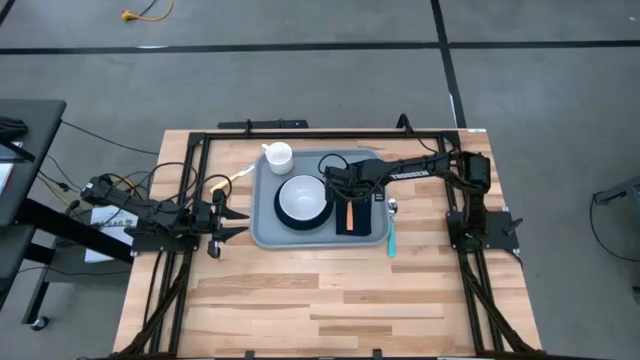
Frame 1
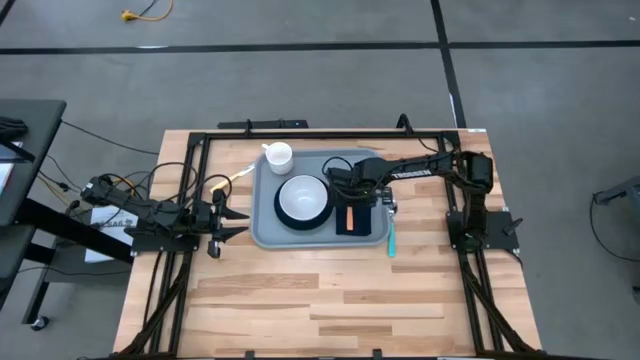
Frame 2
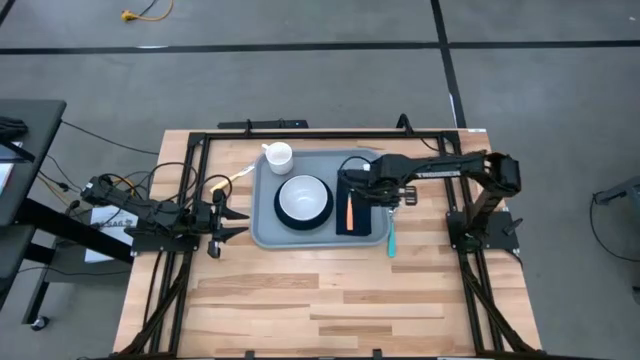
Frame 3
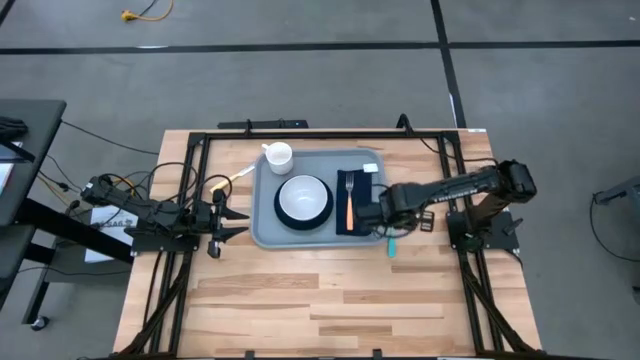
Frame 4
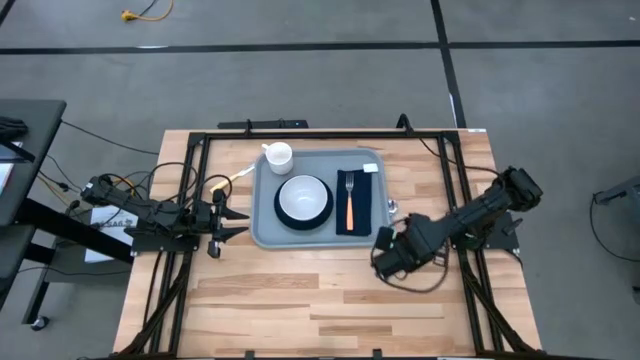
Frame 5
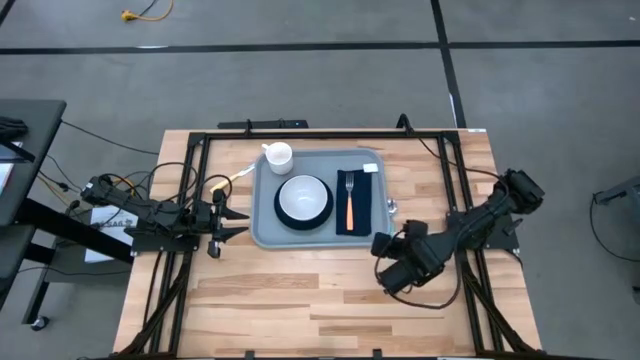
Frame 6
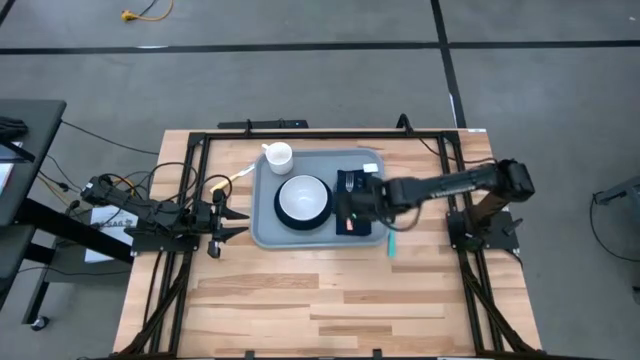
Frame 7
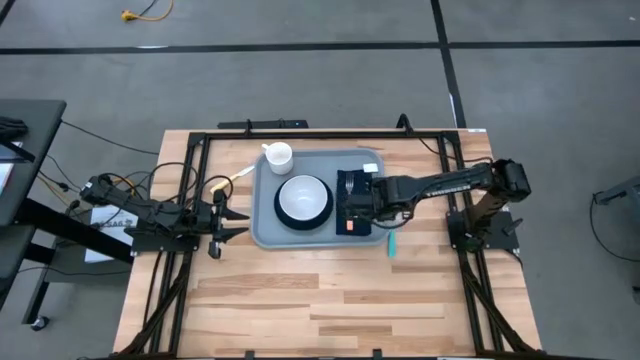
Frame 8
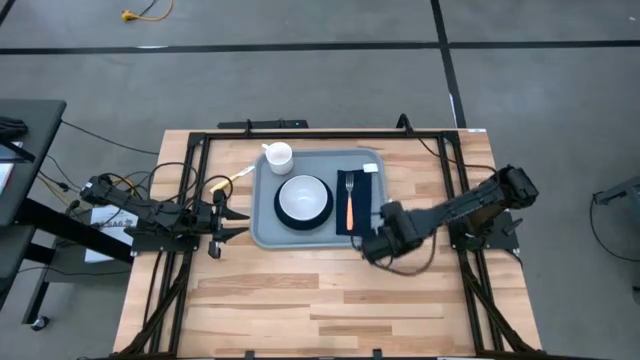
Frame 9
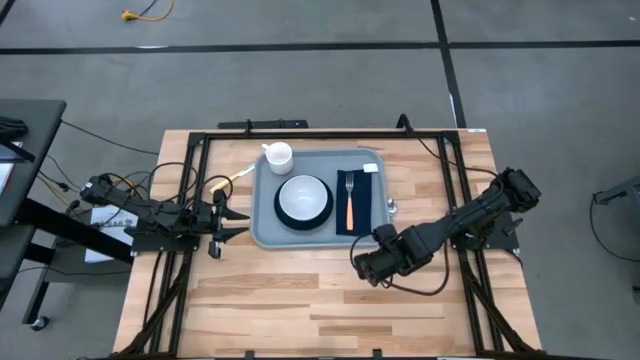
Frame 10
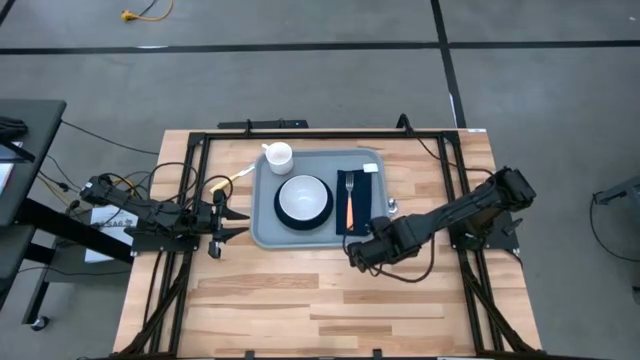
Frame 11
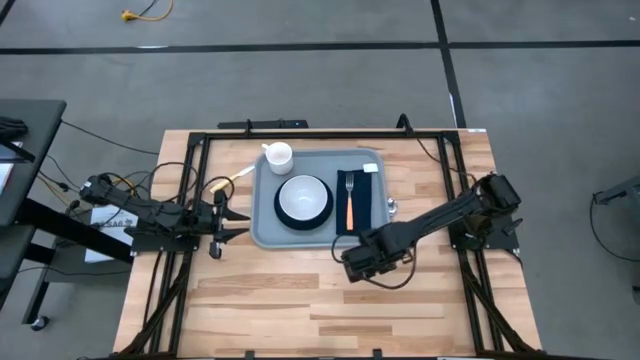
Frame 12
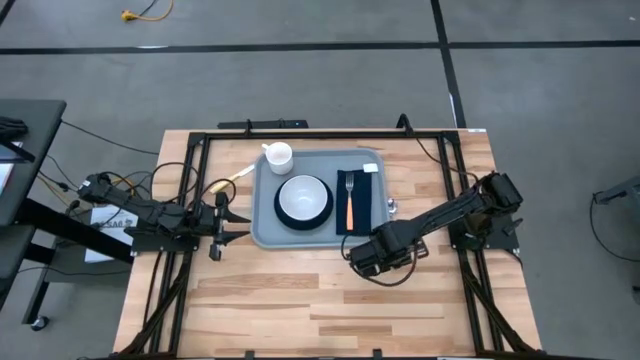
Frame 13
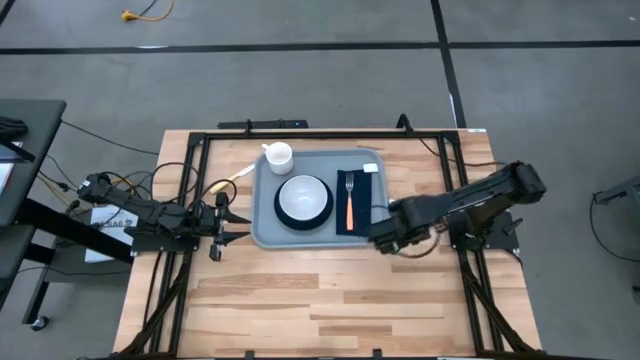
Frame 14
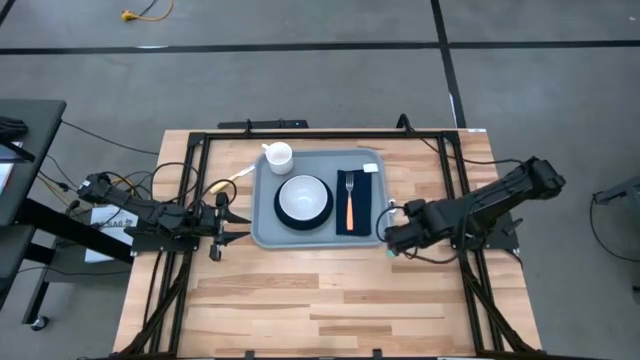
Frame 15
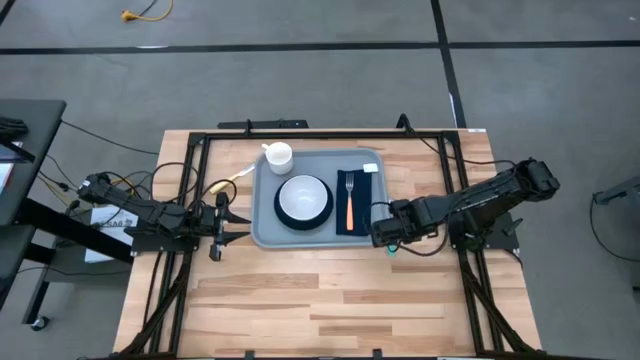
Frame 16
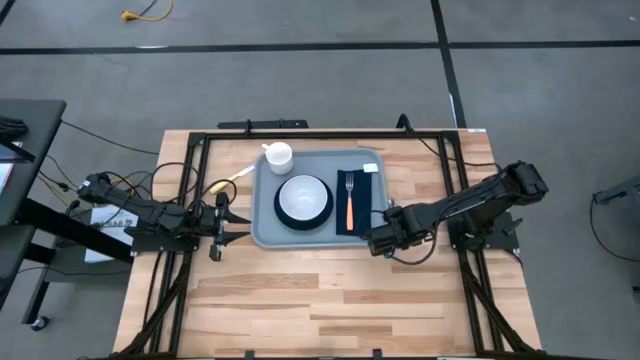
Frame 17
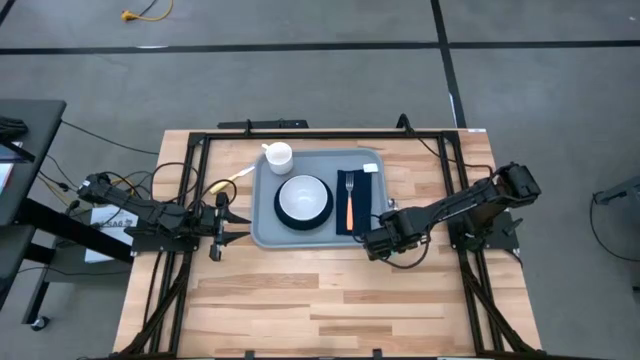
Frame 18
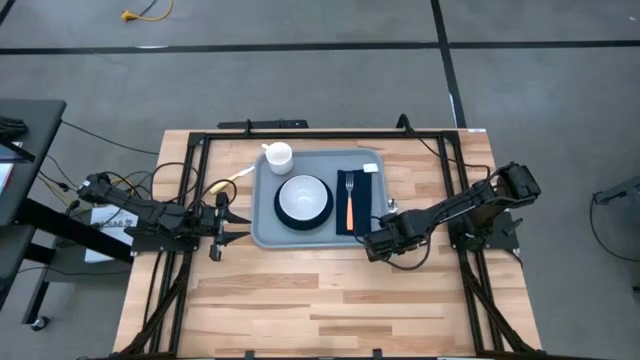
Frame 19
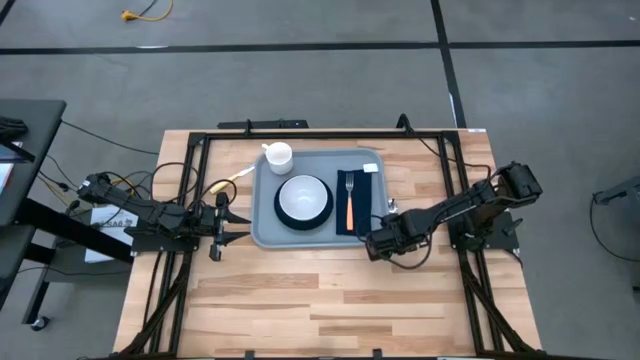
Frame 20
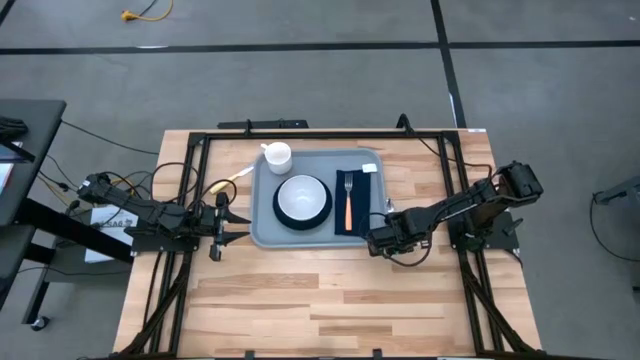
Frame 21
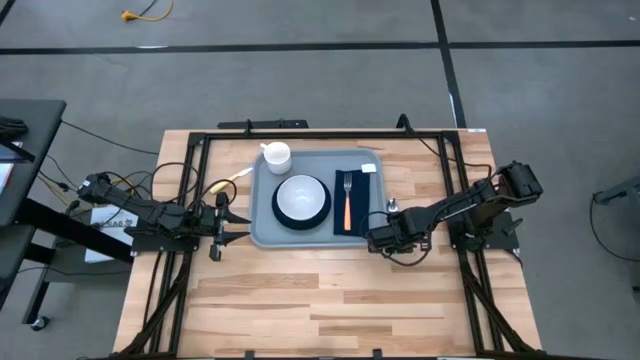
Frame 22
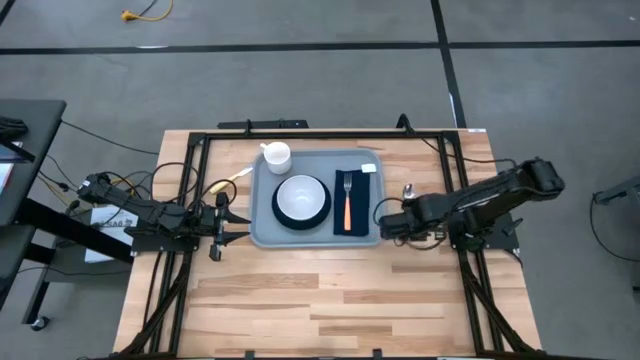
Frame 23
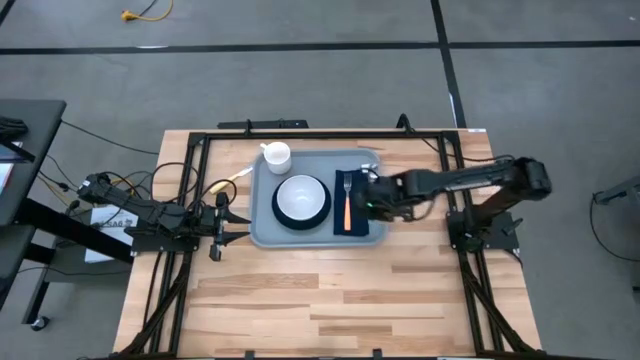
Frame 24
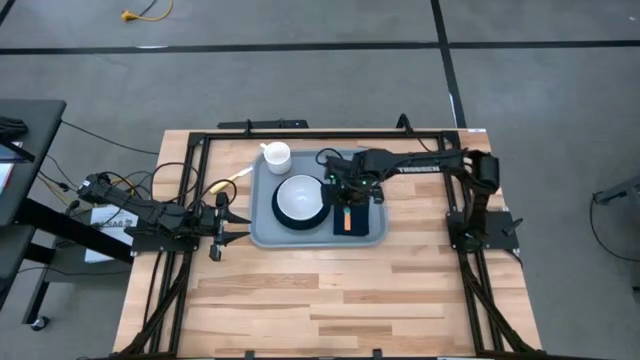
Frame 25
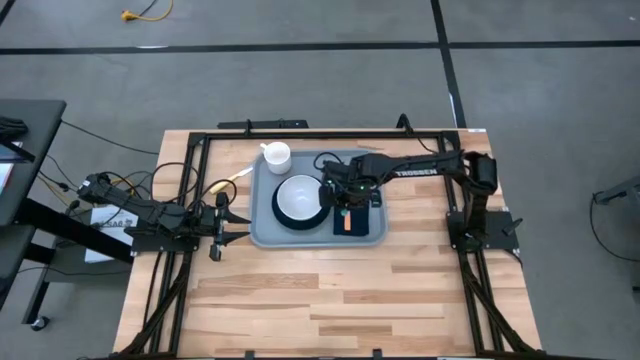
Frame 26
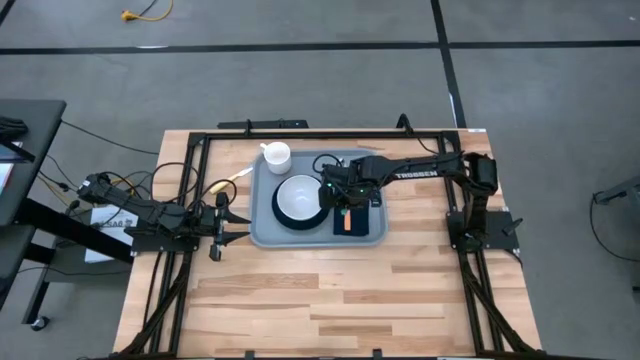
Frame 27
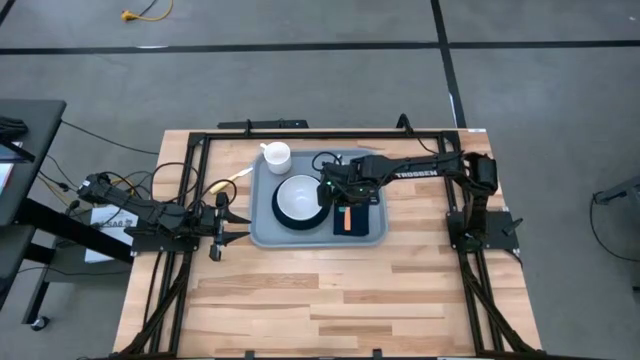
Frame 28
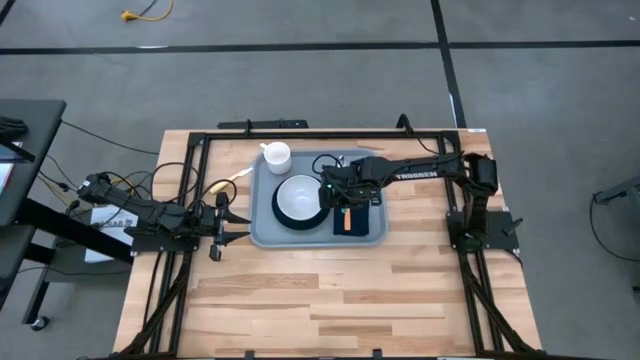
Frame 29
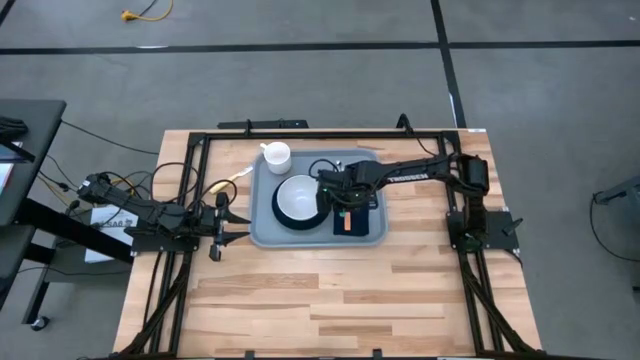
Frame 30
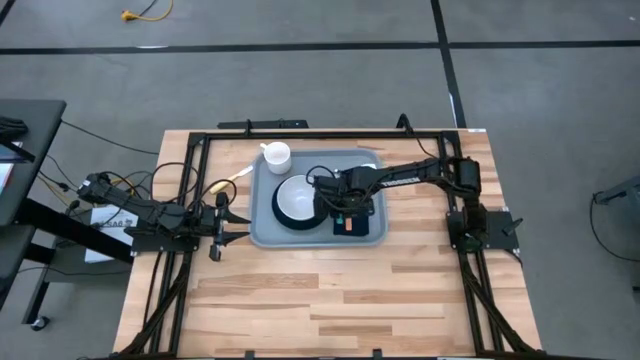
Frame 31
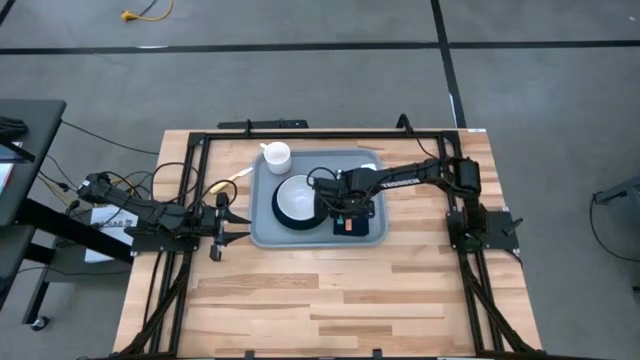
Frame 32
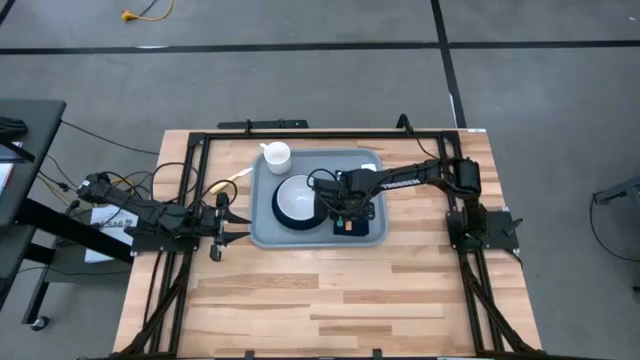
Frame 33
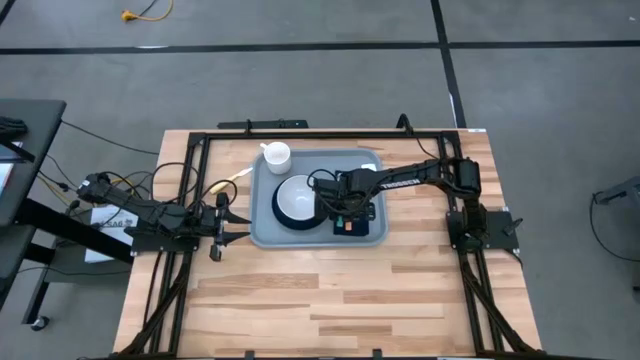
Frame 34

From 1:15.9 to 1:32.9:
Task: Set up tray
Put the blue spoon on top of the black napkin to the left of the orange fork

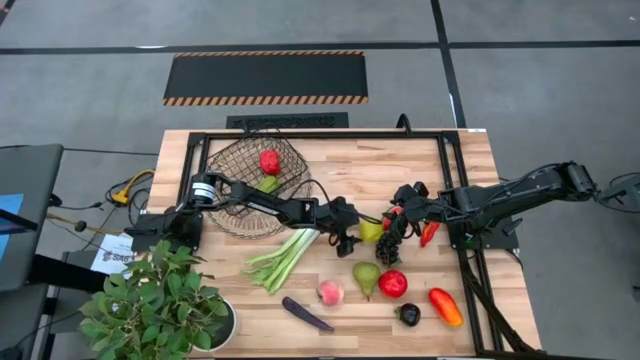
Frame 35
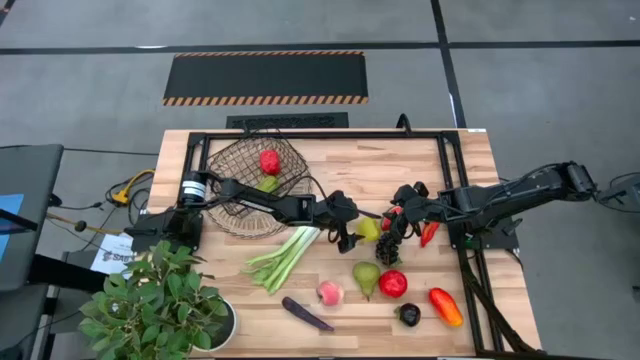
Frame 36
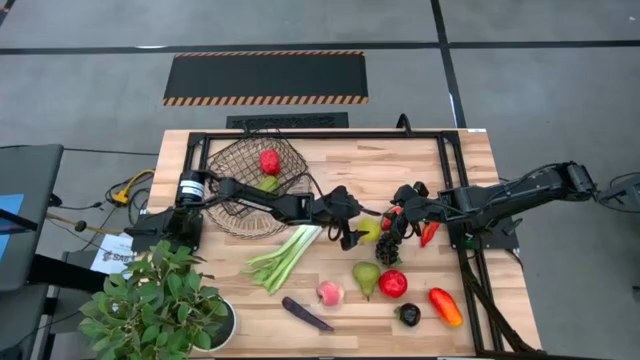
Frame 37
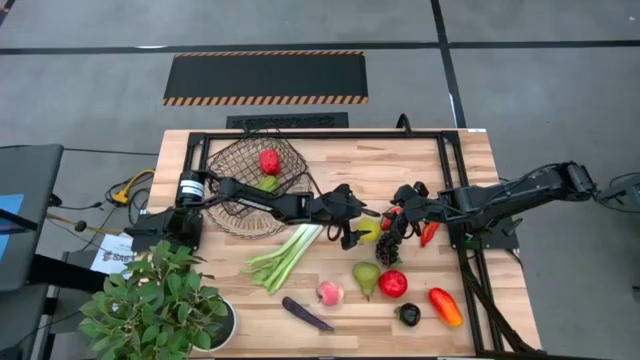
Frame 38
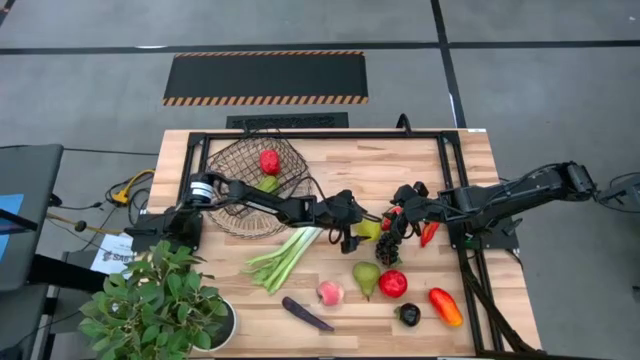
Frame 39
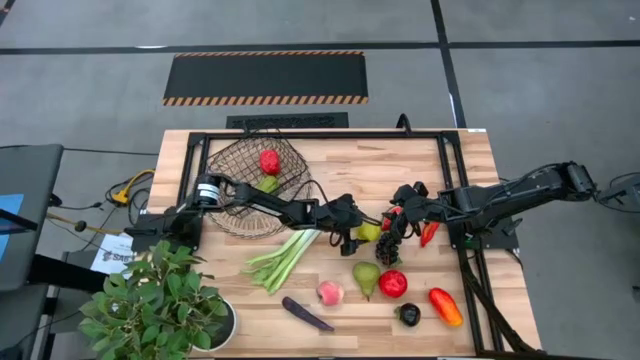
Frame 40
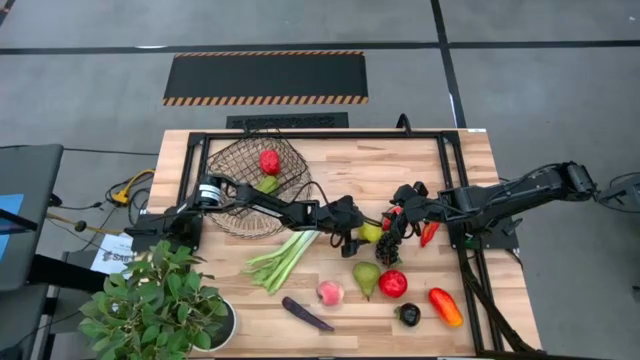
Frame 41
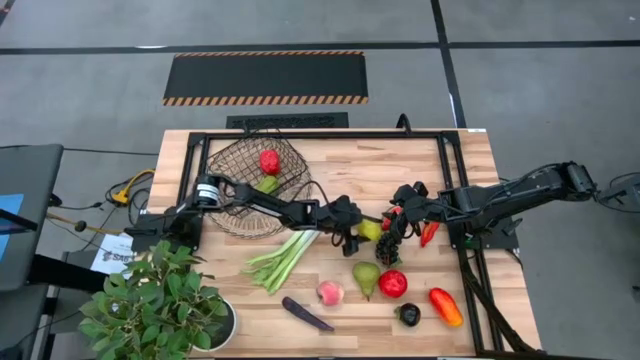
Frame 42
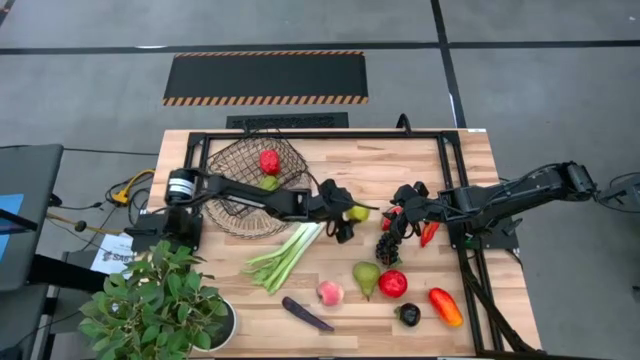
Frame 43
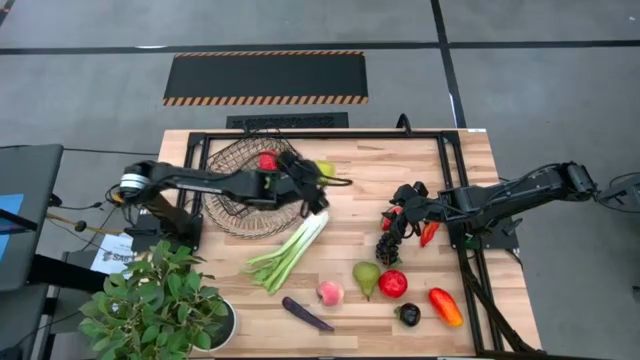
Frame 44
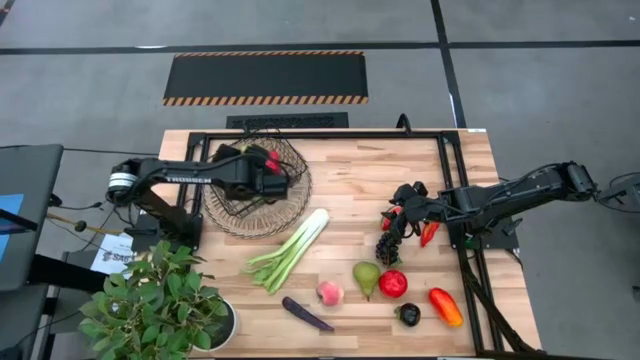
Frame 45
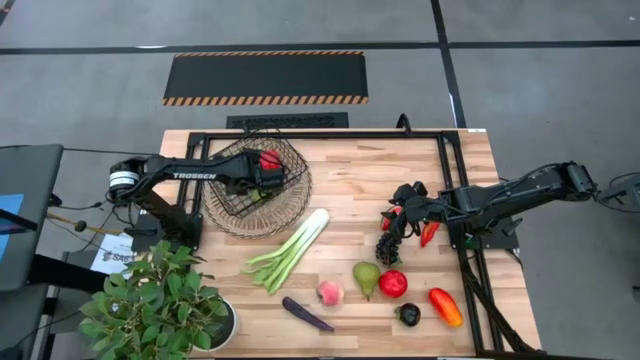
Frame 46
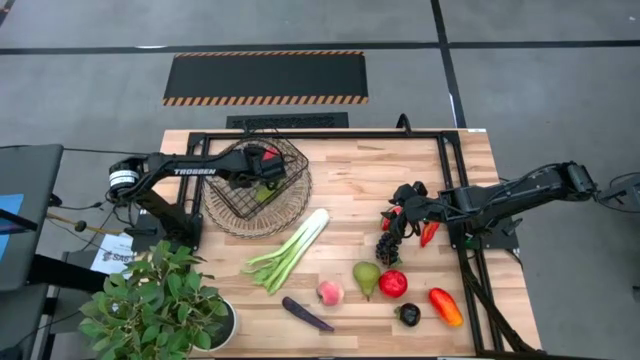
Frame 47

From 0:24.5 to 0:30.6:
Task: Build produce basket
Put the green apple into the wire basket
